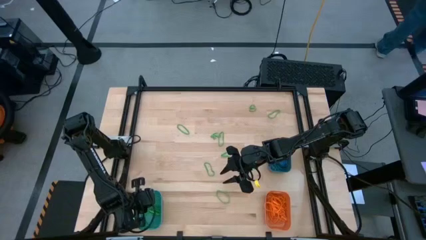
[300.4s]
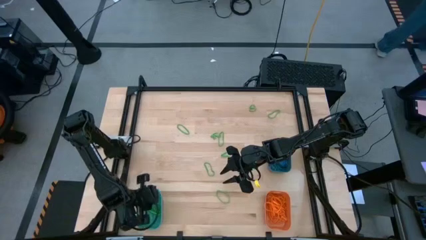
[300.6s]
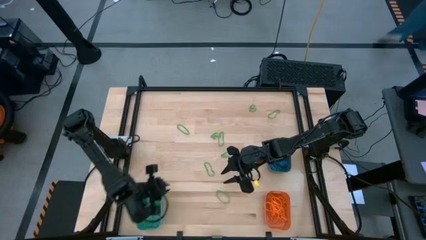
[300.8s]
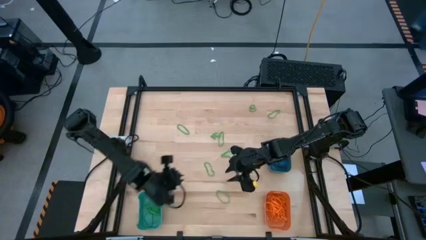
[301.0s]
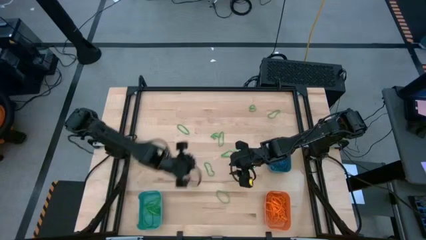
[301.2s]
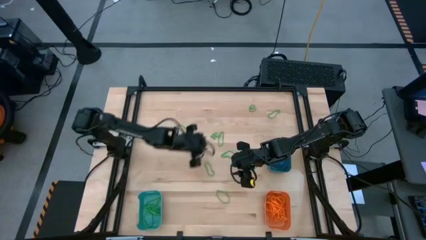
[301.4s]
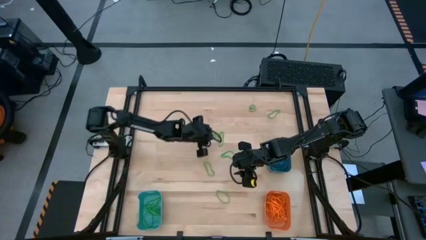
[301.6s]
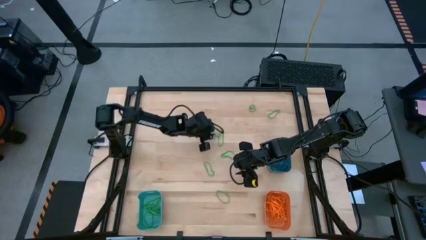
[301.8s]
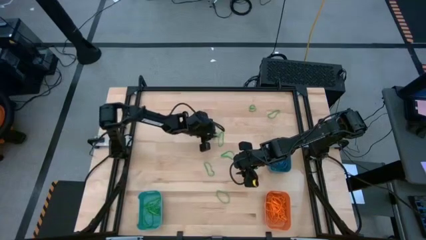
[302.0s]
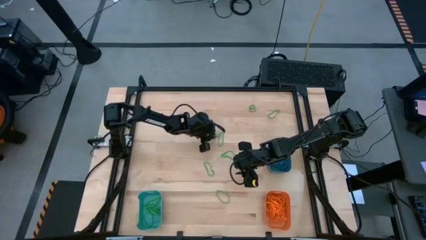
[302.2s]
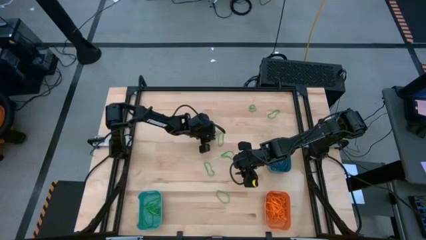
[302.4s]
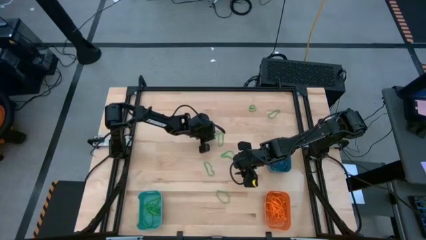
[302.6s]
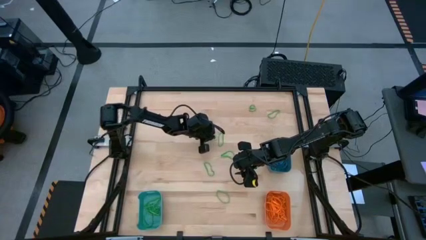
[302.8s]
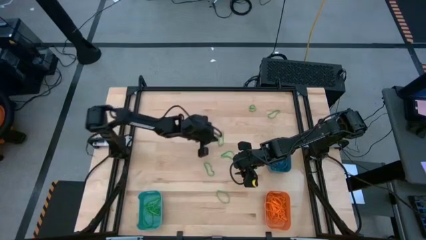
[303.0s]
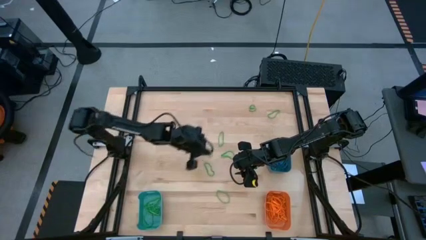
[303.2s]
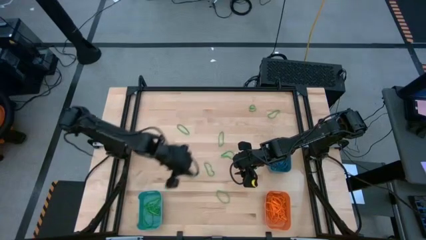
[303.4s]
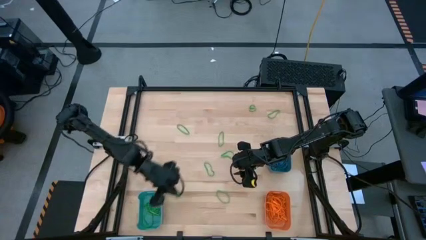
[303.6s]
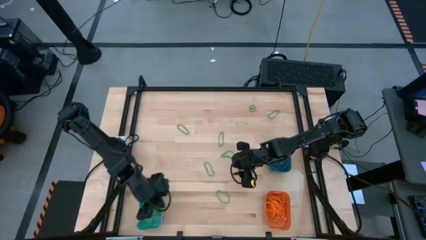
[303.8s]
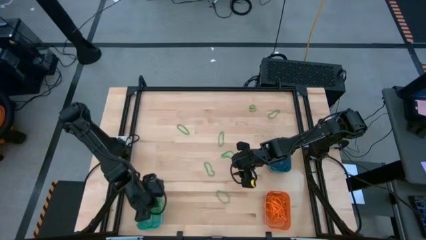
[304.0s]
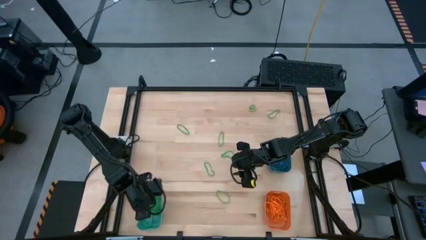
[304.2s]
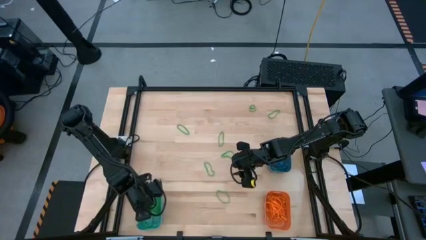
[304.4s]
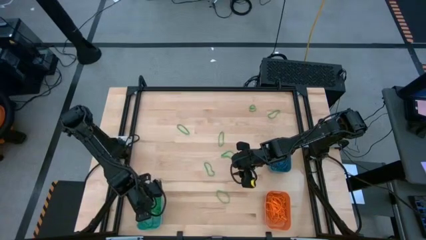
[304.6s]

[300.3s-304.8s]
Task: Sort rubber bands into baskets
Put the green rubber band into the green bin

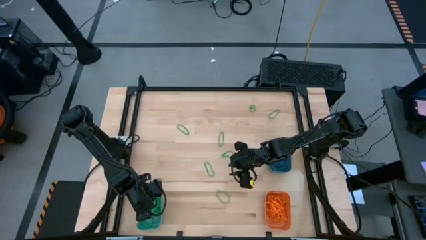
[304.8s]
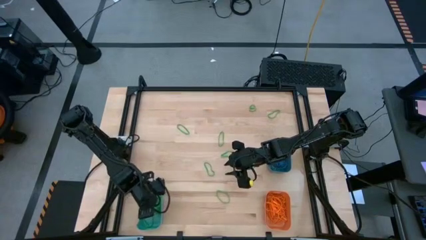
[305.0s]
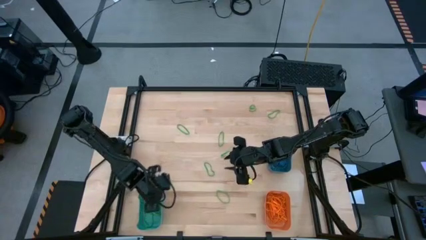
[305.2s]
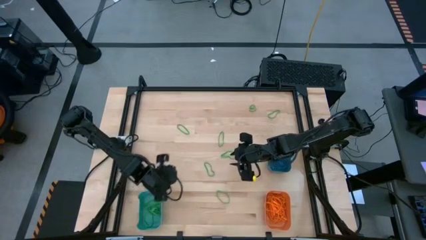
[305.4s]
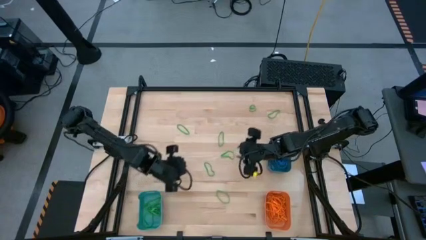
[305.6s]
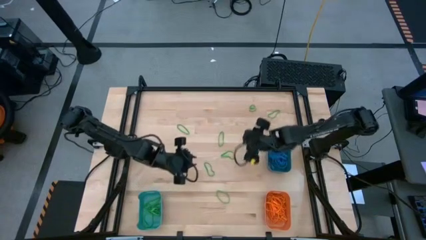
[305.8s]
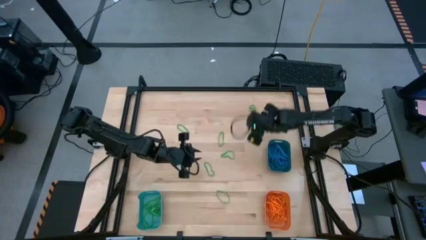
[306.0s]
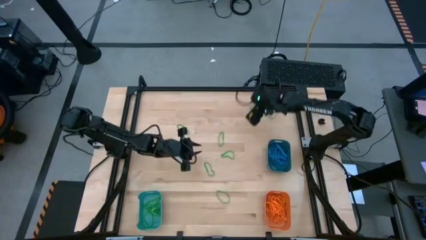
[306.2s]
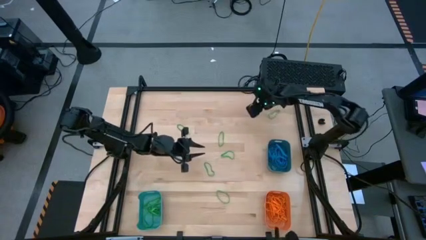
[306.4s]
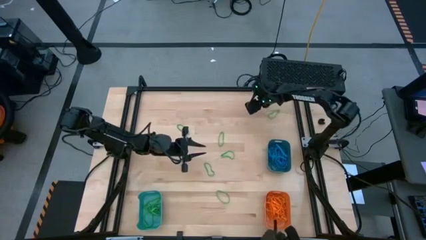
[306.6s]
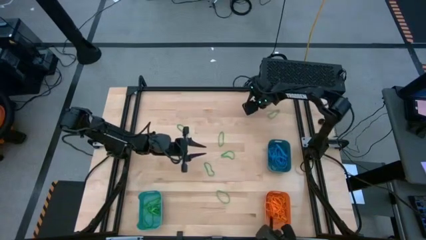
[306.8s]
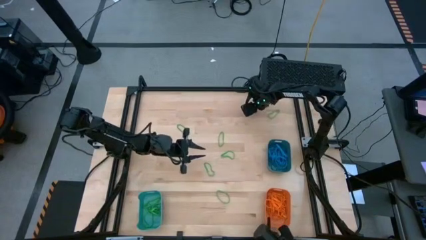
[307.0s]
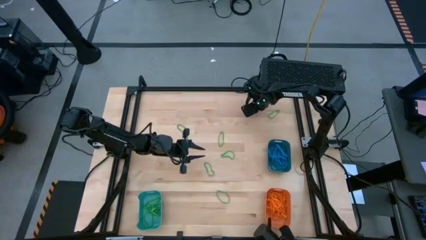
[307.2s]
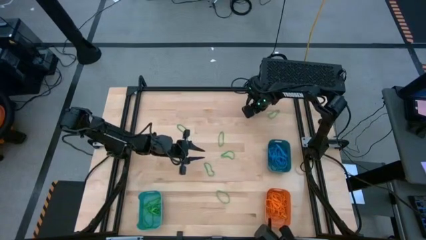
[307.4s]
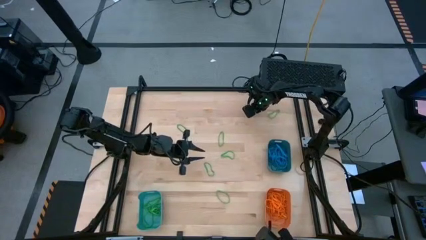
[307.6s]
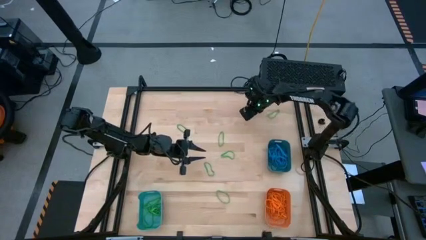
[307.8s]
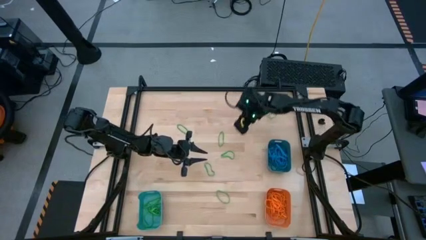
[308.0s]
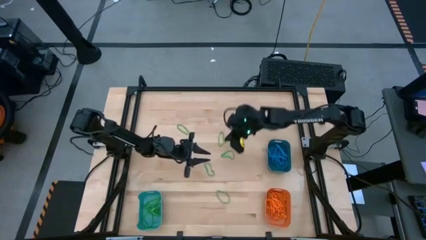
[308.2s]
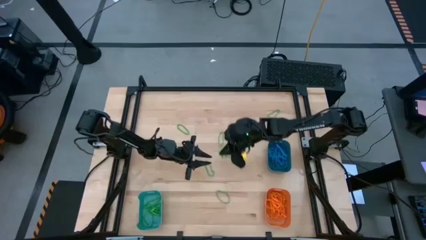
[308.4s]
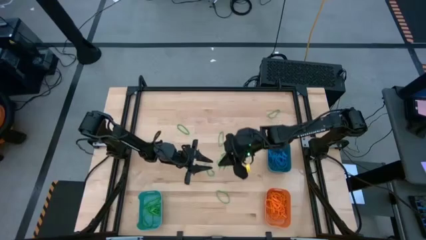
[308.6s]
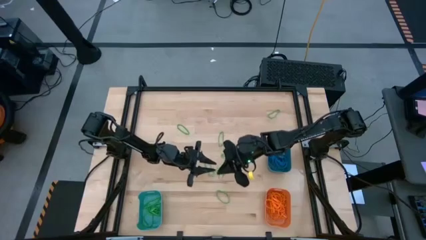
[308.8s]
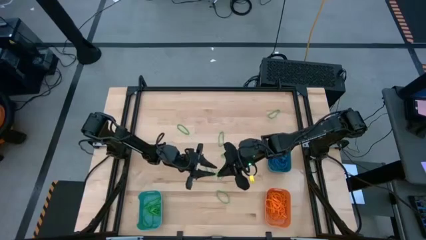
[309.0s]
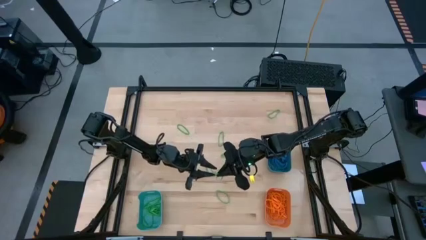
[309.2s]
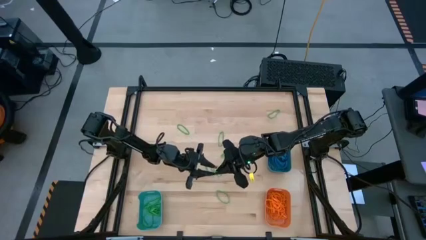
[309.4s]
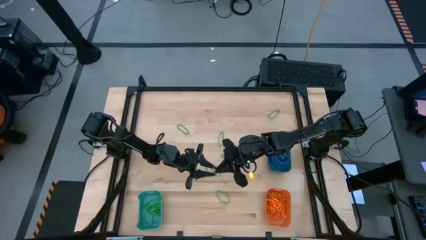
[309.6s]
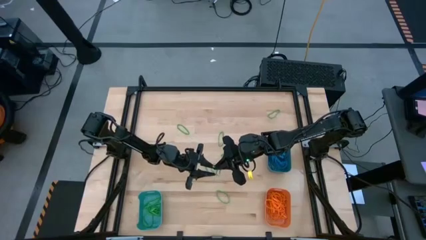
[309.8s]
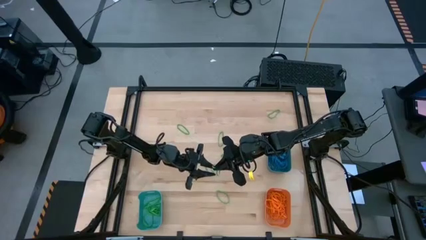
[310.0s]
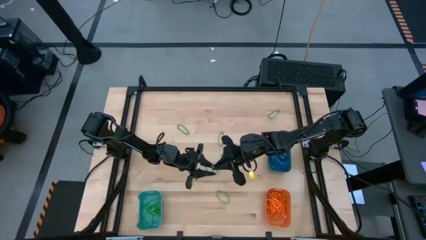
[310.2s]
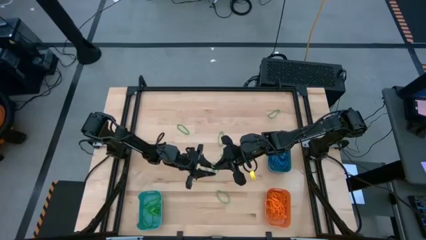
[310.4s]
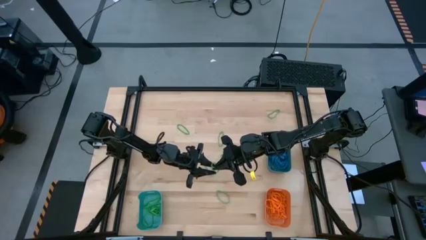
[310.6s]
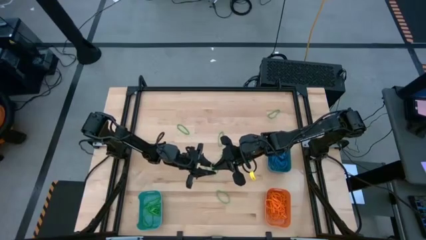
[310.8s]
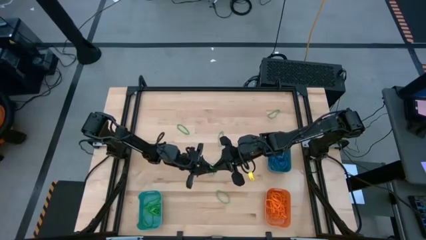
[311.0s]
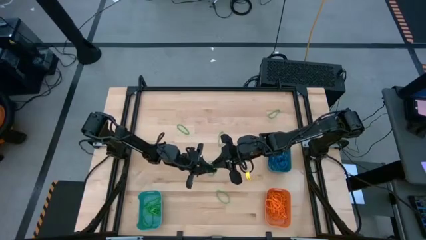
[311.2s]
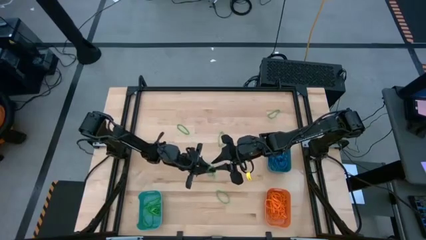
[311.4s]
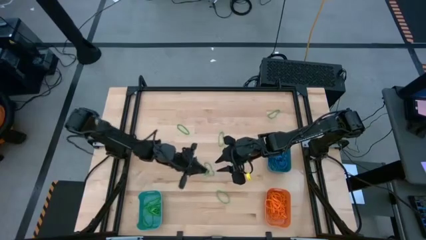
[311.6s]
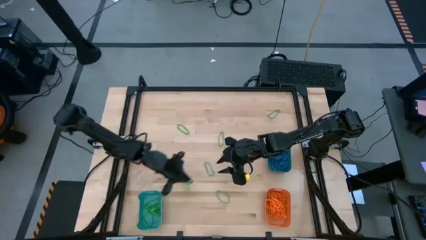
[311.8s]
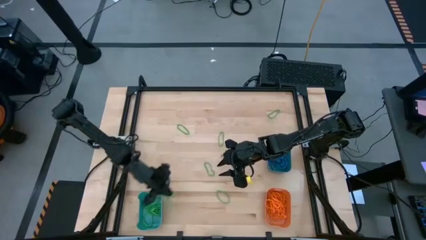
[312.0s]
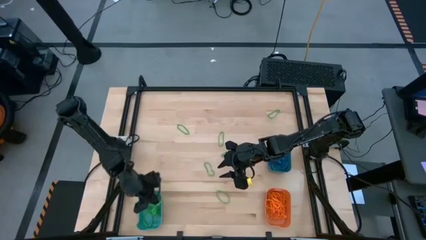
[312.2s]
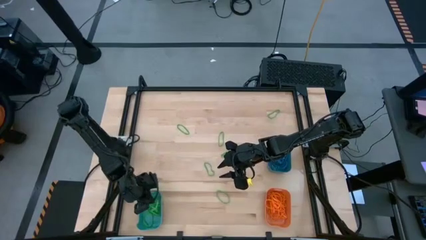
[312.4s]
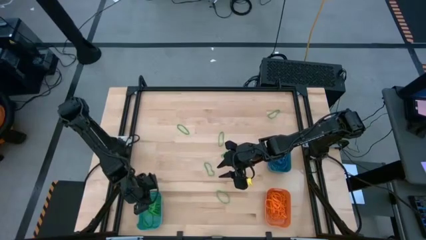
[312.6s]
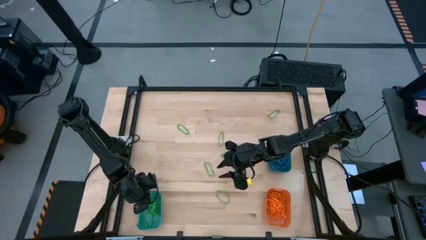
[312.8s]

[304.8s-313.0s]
Put the green rubber band into the green bin

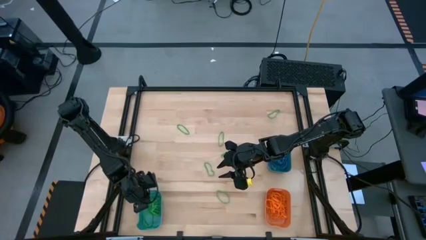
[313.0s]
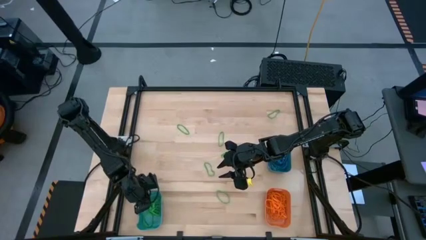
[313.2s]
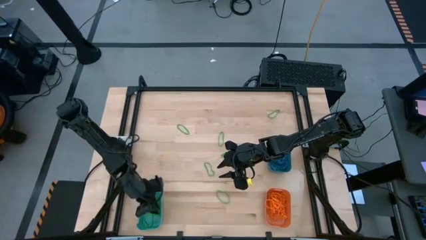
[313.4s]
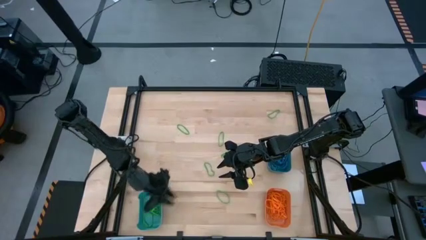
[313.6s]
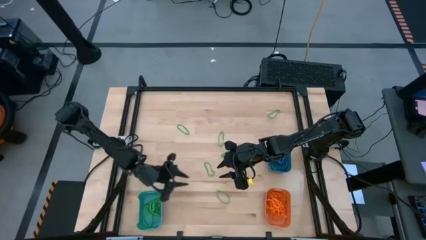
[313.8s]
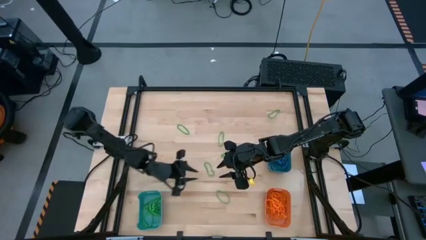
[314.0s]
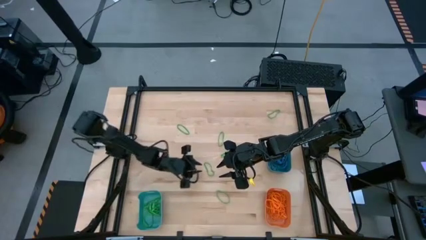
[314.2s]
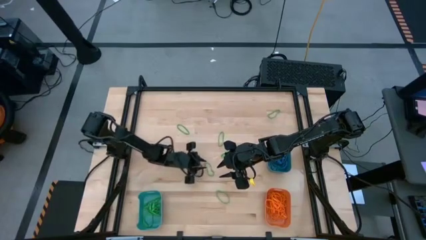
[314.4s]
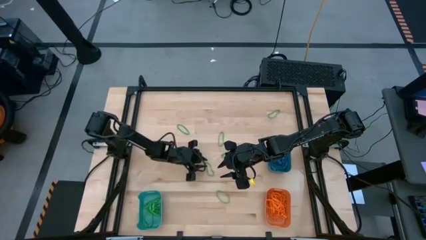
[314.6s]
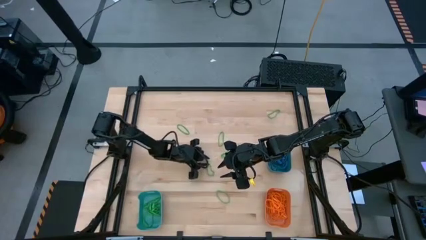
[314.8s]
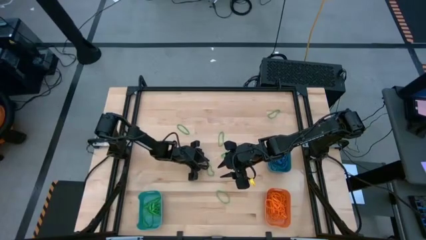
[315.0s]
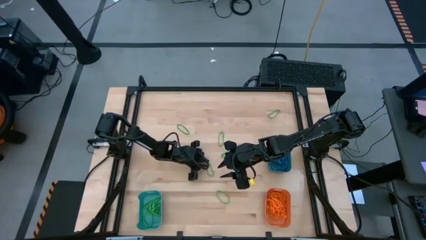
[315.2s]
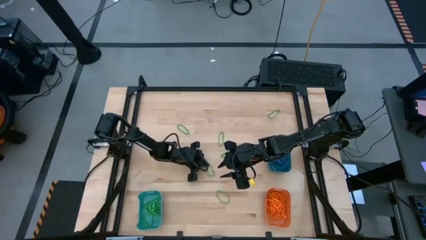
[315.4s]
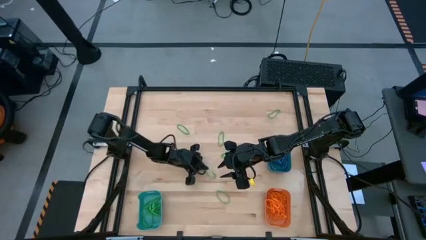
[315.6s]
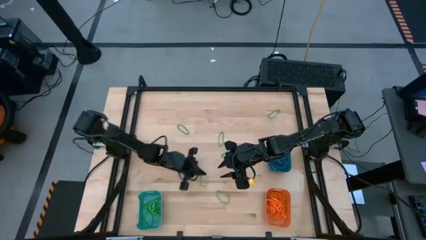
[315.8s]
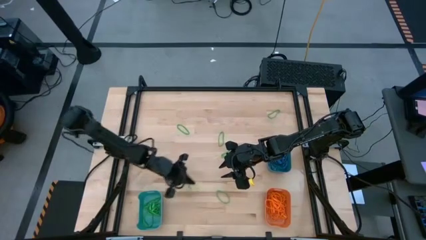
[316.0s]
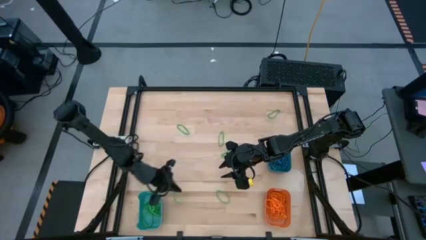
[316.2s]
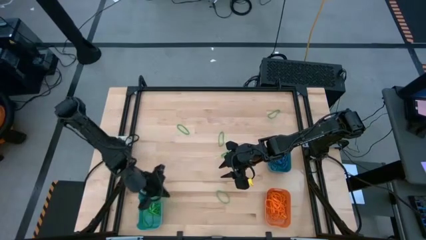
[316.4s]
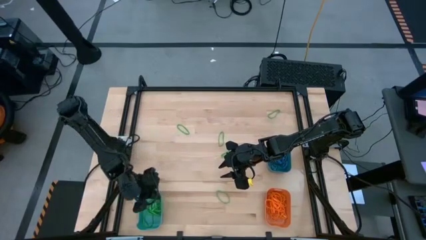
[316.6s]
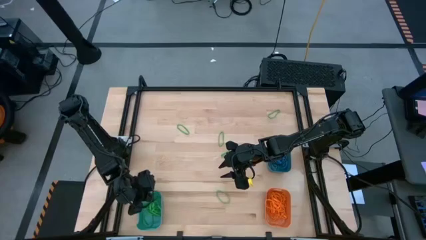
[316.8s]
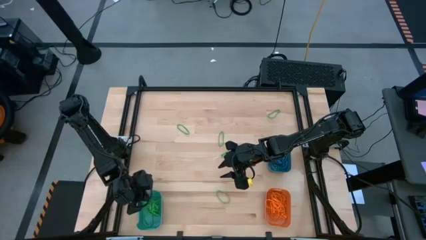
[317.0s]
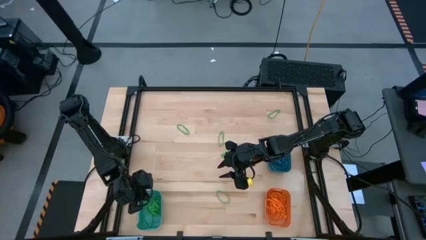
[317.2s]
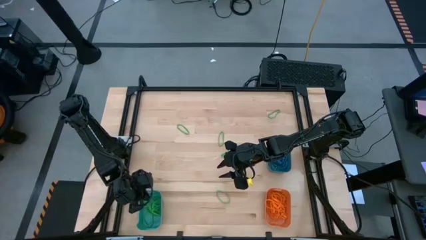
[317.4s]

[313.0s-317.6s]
Put the green rubber band into the green bin
